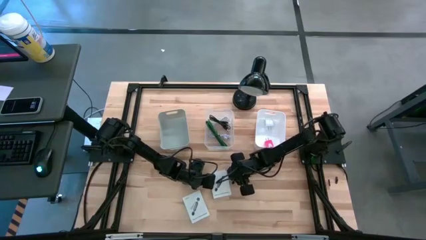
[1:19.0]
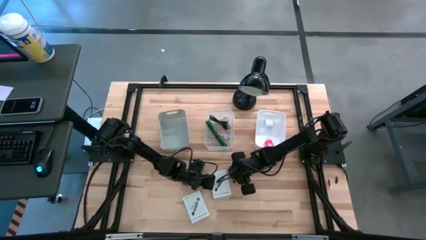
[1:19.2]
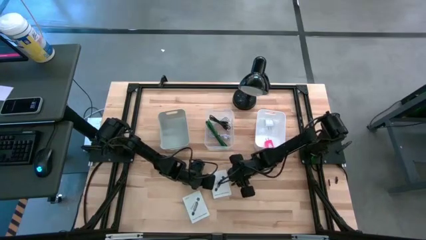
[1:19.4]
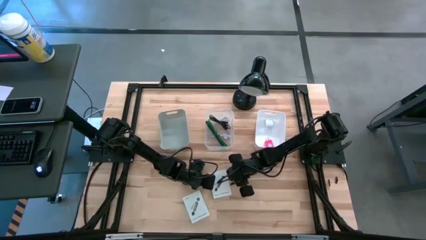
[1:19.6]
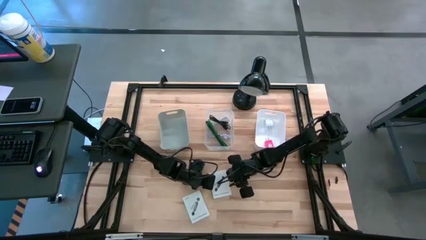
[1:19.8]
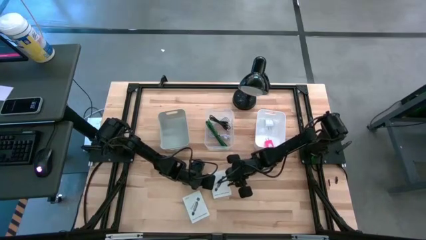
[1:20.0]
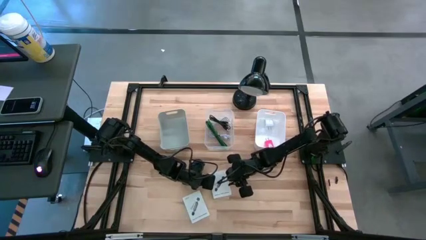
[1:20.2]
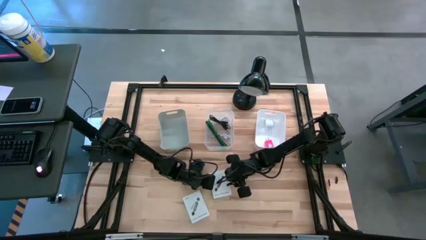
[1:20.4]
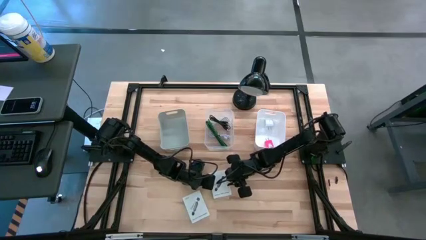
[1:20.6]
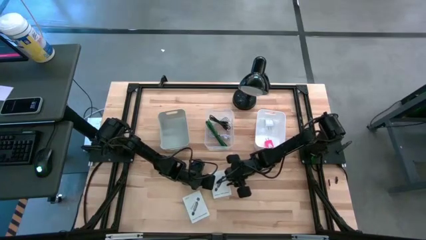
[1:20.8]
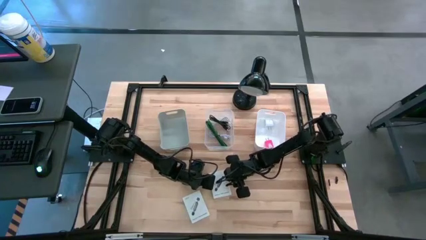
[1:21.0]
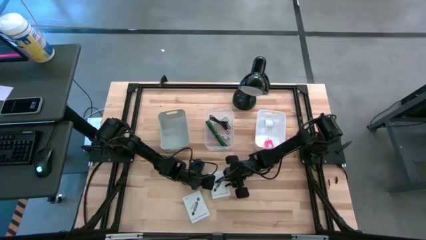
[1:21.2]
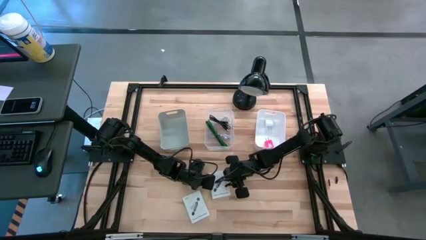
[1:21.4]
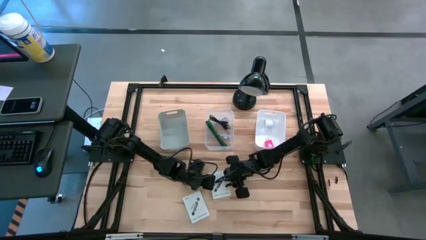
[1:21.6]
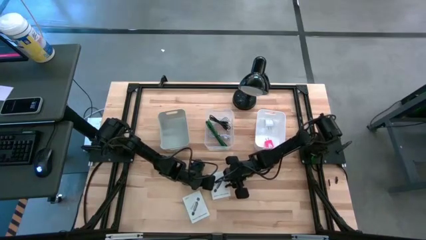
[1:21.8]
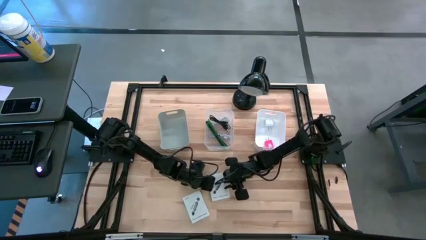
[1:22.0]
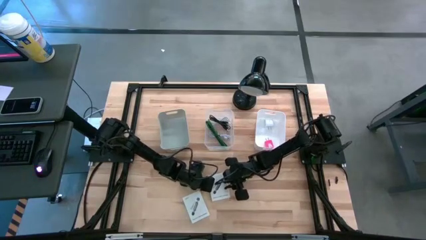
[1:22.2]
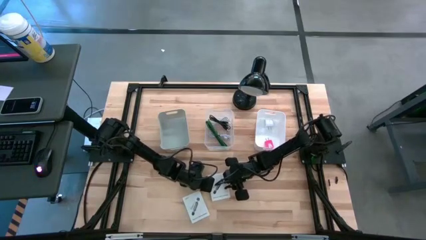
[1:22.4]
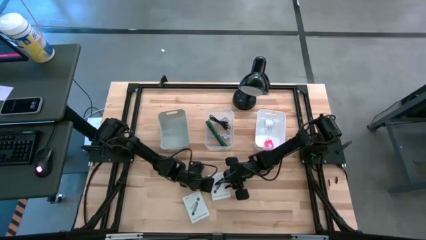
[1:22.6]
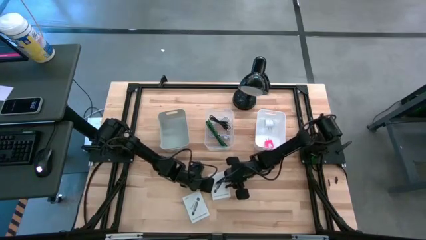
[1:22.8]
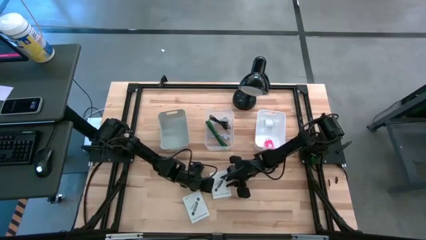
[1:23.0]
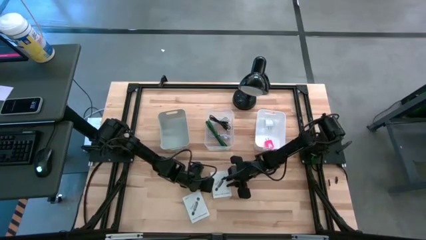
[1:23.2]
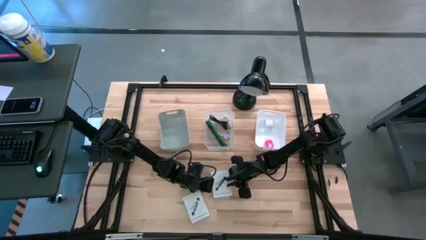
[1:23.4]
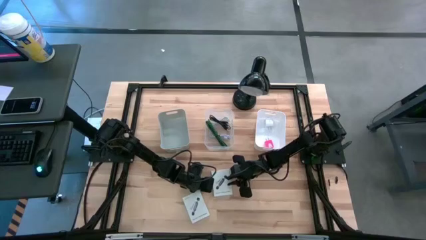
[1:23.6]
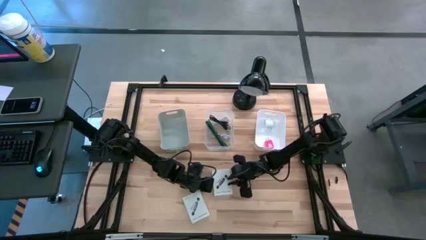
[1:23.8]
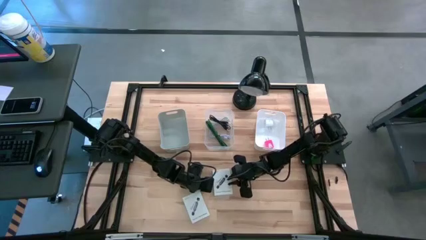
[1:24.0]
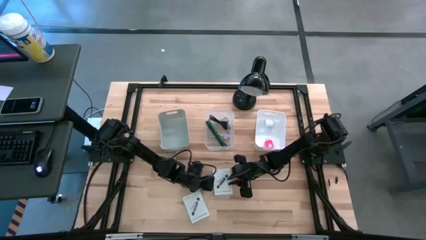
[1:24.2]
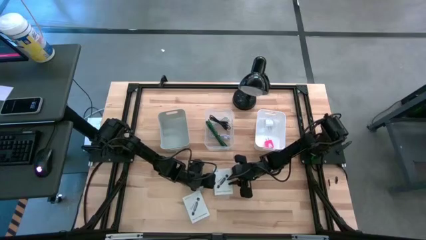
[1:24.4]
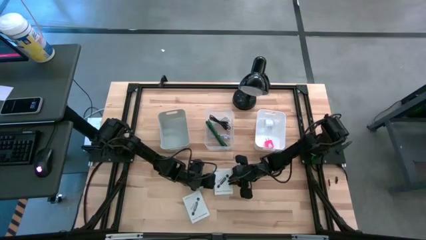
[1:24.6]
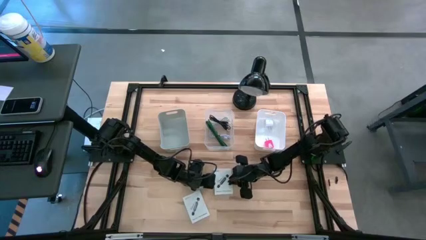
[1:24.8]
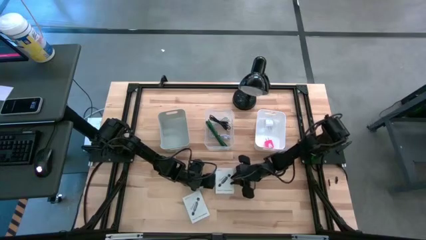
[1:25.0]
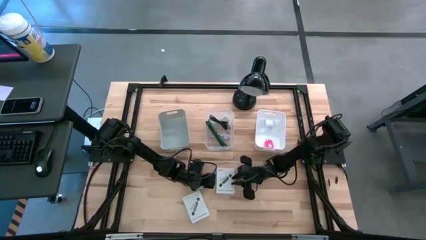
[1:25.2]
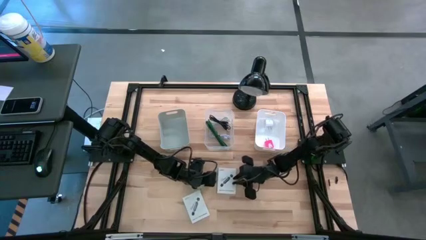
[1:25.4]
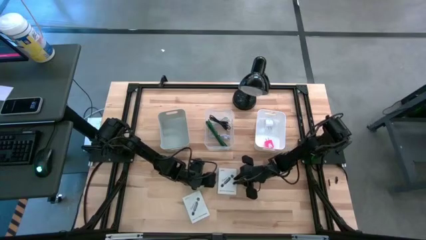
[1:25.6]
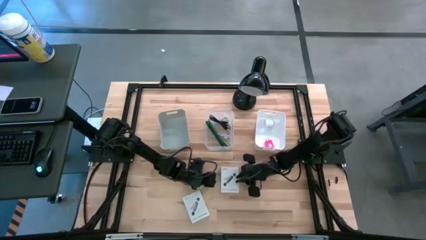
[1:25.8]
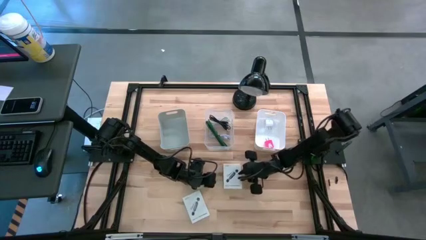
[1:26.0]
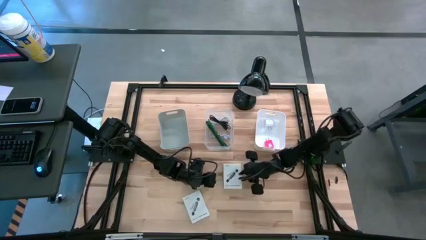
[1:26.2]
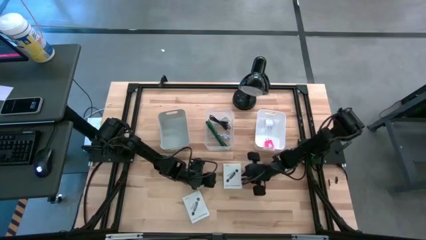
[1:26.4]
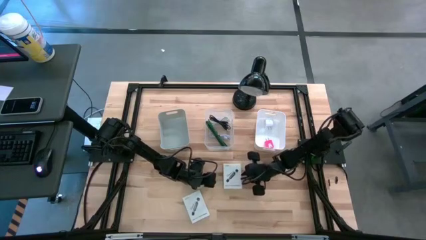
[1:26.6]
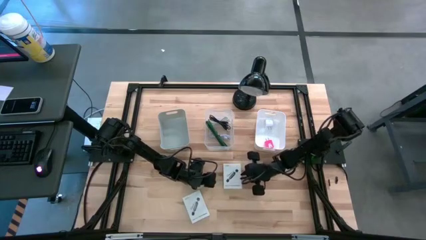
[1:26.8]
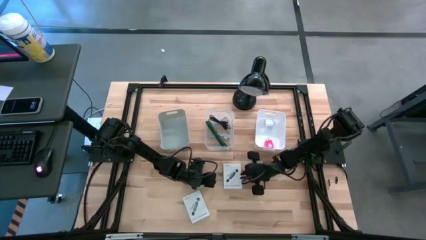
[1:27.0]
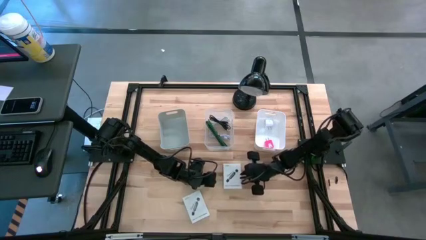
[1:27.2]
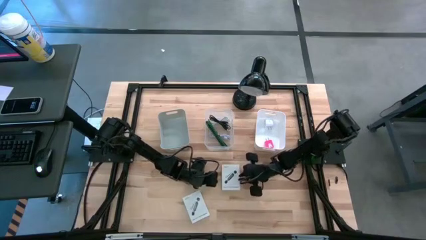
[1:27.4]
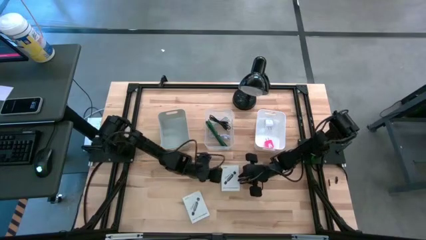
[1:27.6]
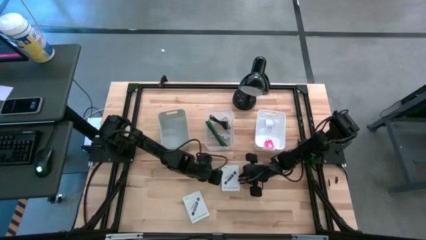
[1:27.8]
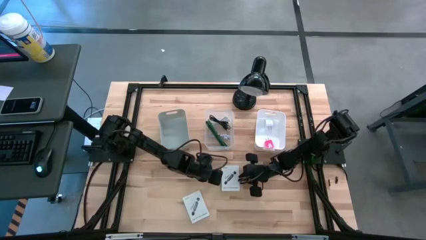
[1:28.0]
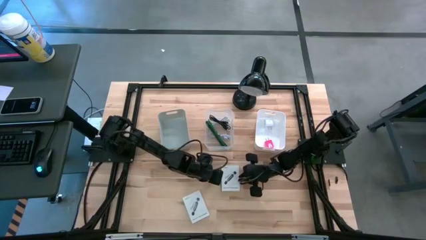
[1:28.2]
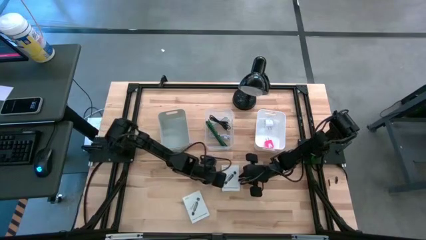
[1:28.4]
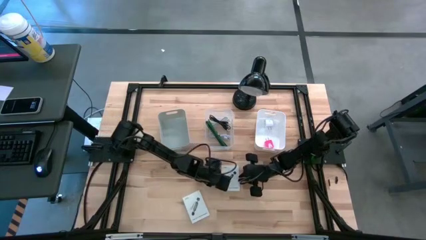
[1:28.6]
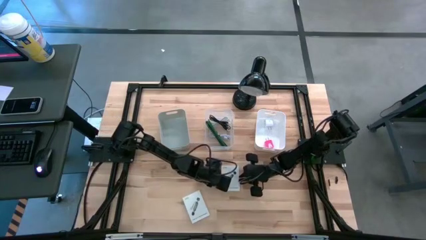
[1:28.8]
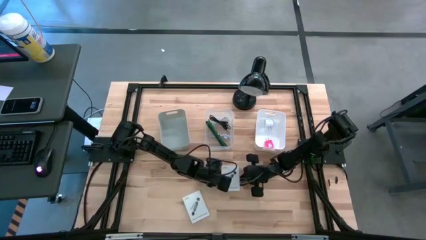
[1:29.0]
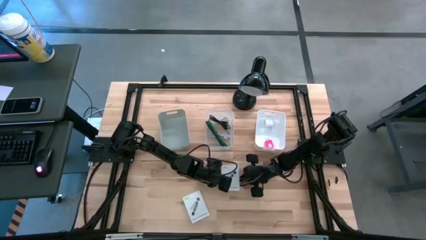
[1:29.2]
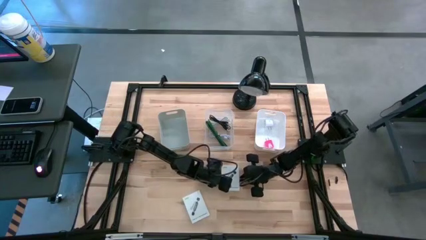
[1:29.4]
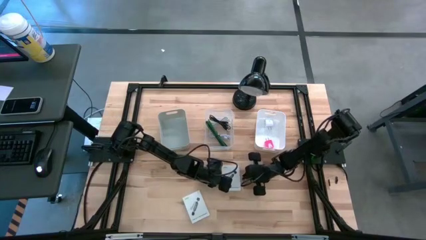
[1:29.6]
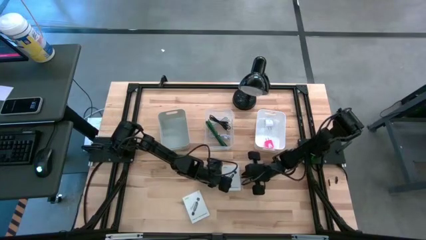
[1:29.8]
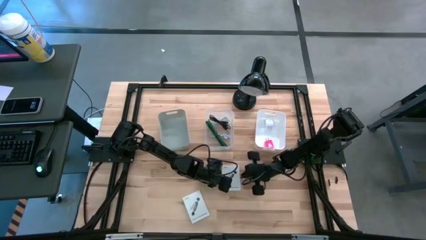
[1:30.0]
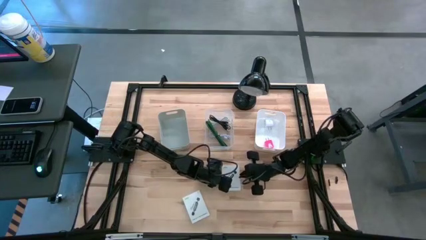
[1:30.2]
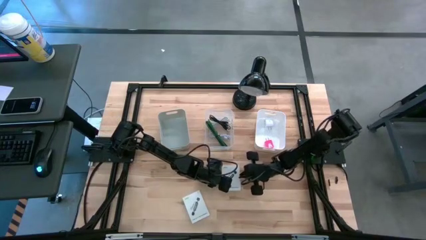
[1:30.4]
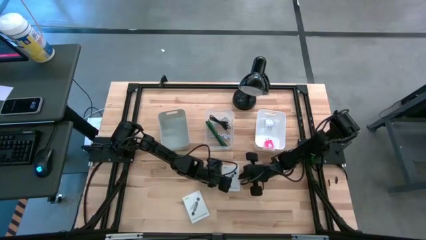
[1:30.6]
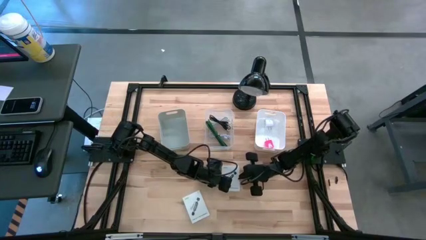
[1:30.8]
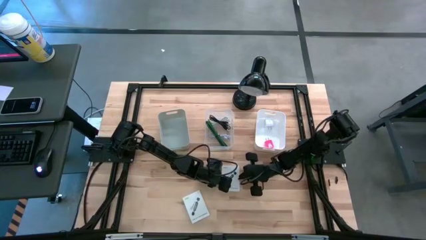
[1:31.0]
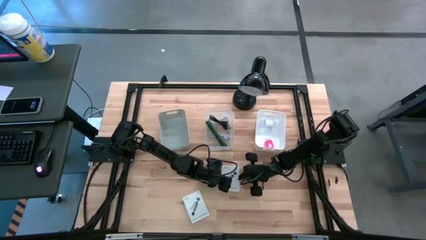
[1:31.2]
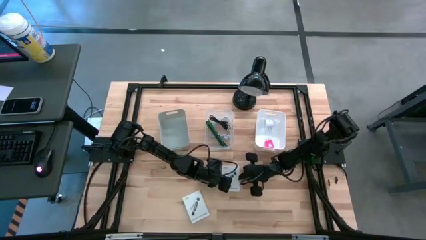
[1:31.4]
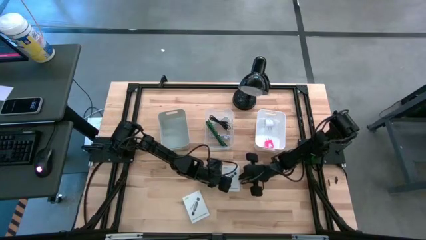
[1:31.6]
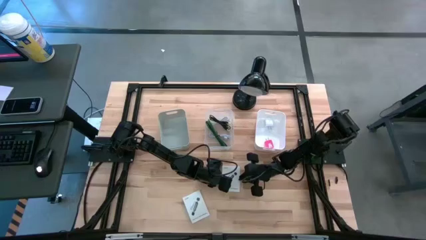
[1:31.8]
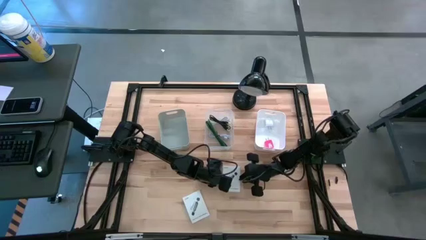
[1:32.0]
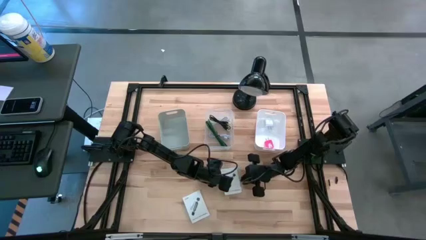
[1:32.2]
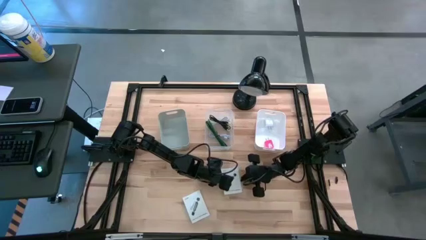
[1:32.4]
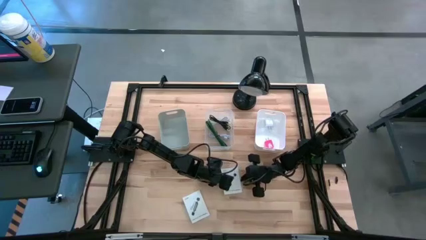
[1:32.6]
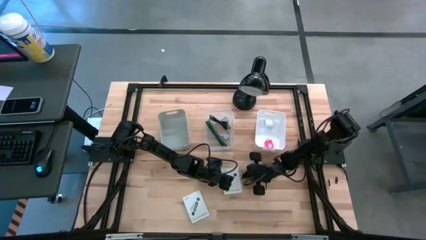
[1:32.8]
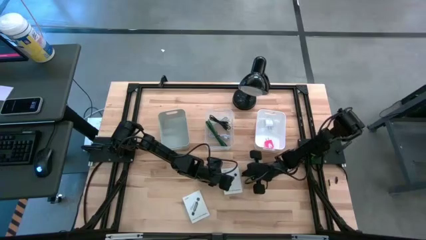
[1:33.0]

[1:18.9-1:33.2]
Task: Pick and place items into bin
Put the top white card reader box into the gray bin

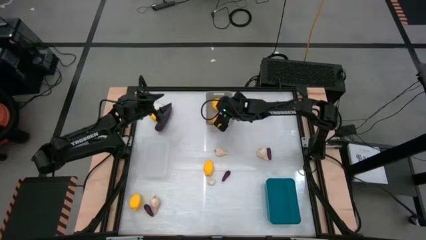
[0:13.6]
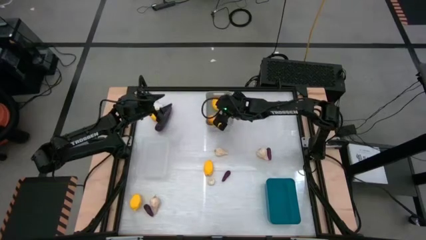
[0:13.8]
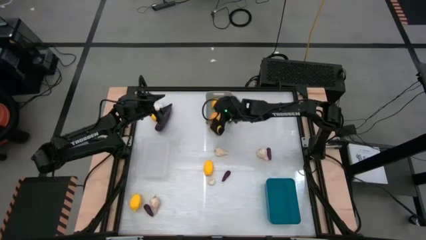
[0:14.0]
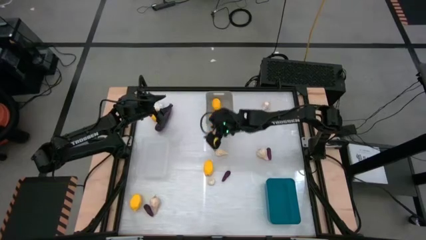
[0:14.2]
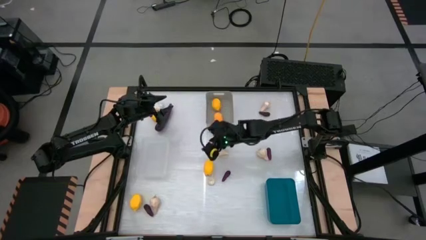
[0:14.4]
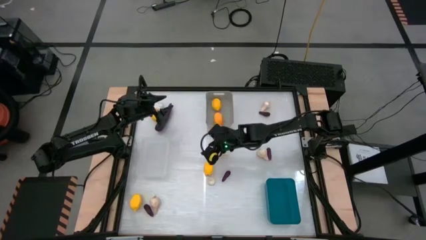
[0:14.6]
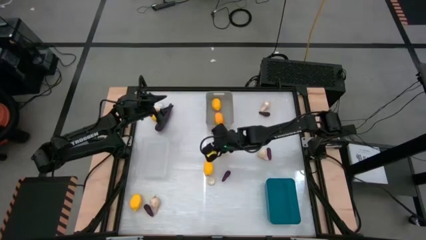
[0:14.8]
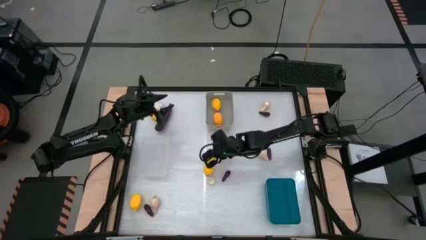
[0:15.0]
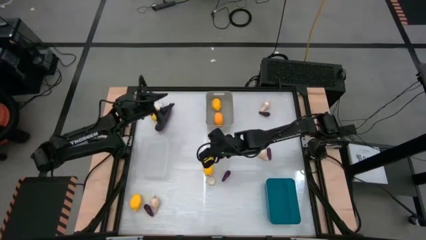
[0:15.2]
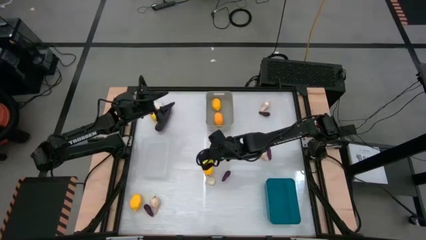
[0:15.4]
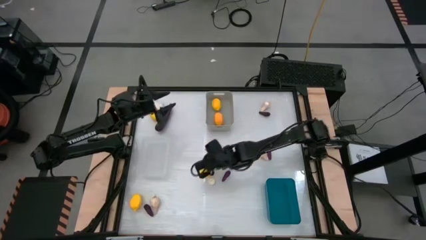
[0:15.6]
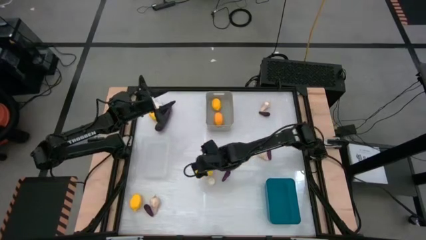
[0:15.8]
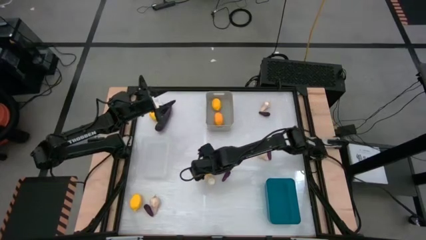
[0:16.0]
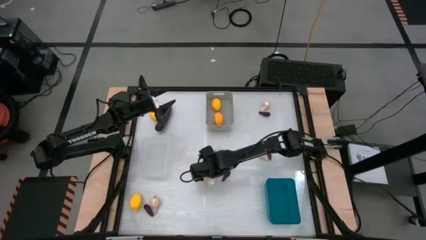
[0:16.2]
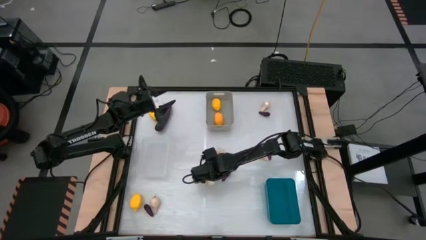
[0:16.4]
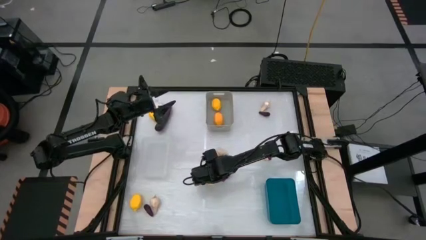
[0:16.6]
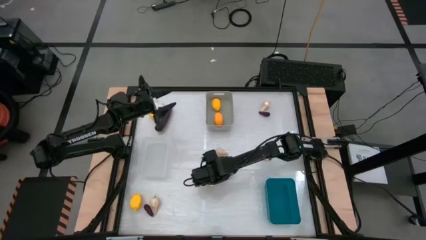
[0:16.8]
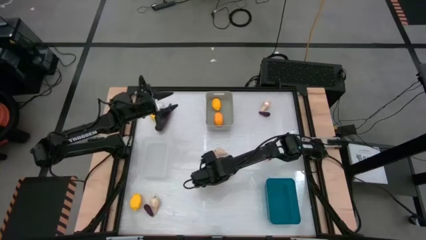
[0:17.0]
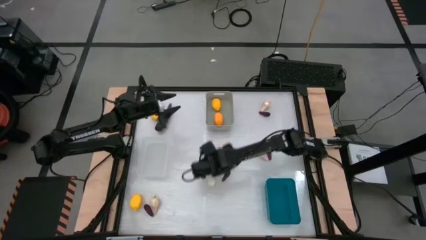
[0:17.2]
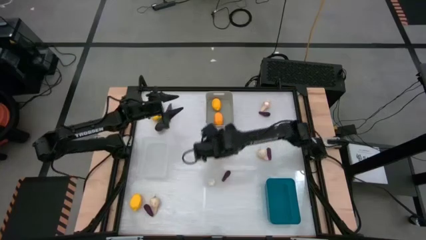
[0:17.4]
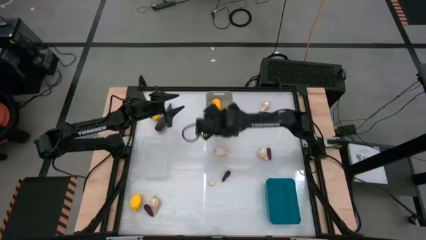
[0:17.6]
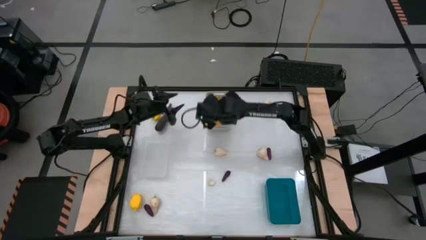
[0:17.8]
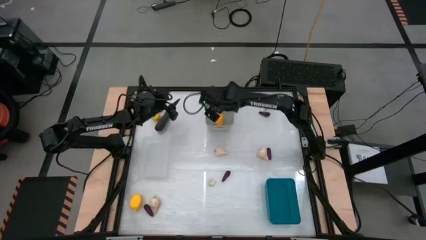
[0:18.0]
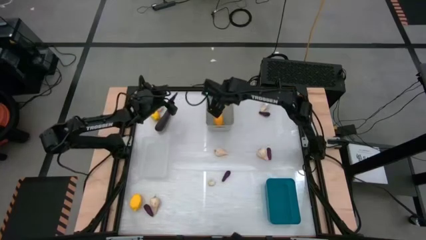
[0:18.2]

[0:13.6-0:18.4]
Task: Sort produce into baskets
Put the lemon into the gray bin
